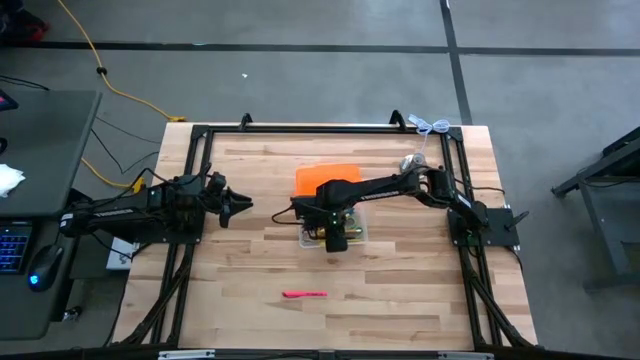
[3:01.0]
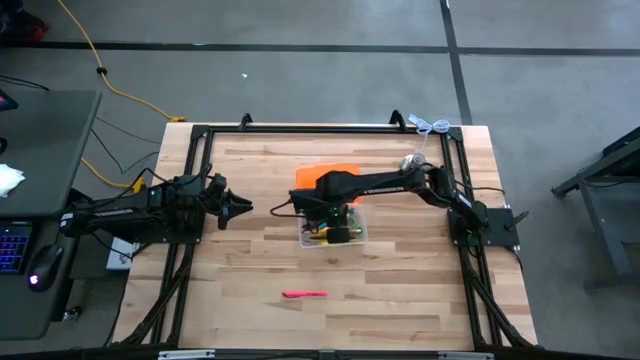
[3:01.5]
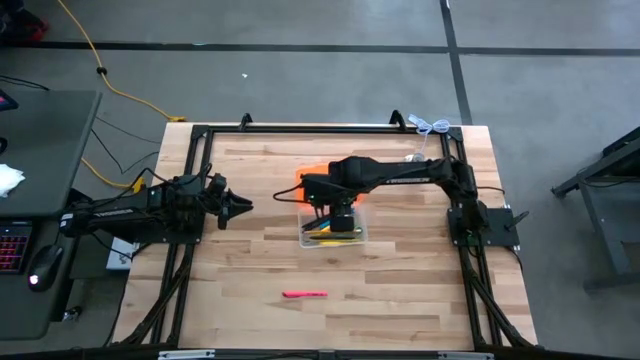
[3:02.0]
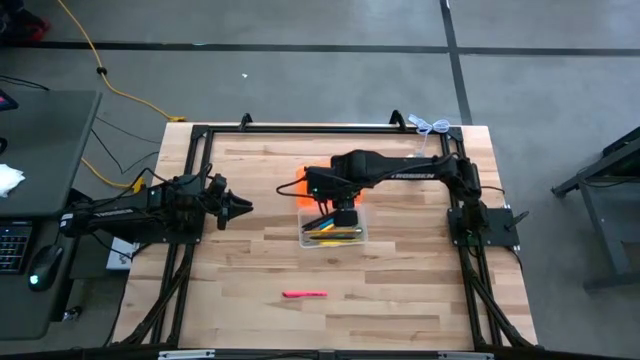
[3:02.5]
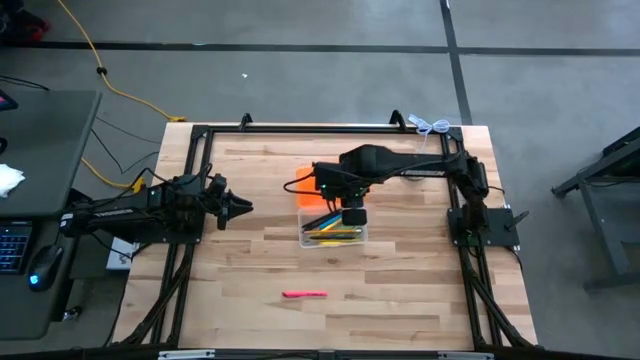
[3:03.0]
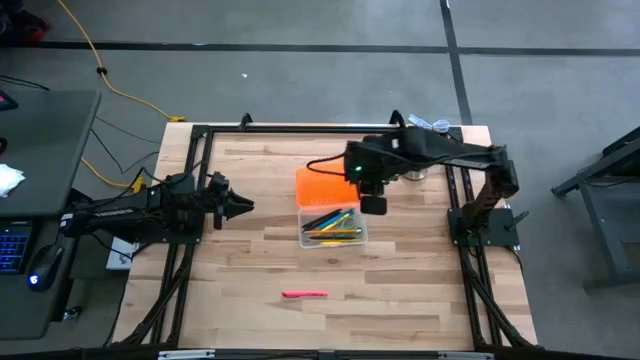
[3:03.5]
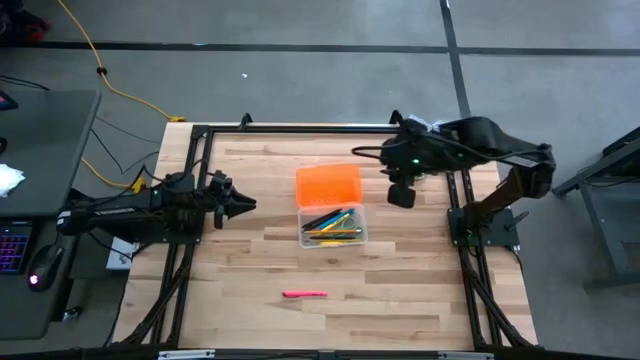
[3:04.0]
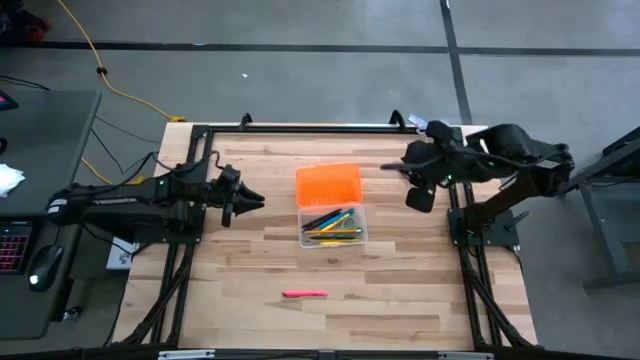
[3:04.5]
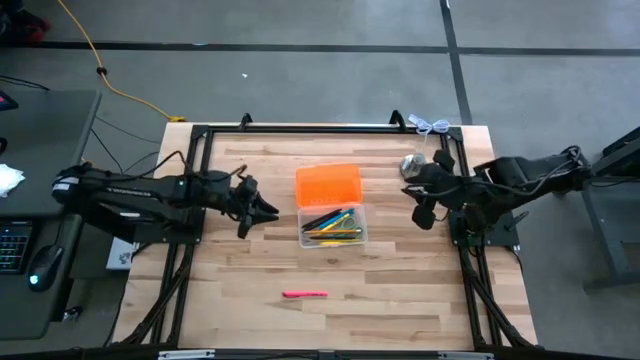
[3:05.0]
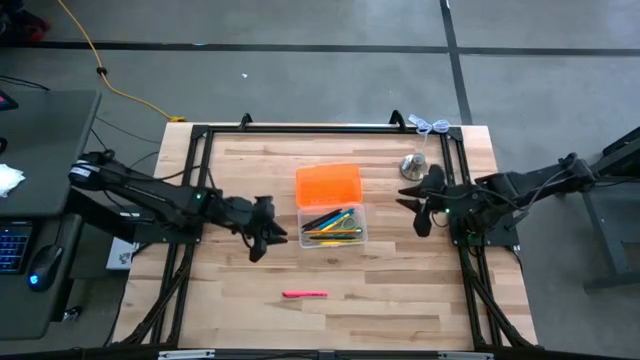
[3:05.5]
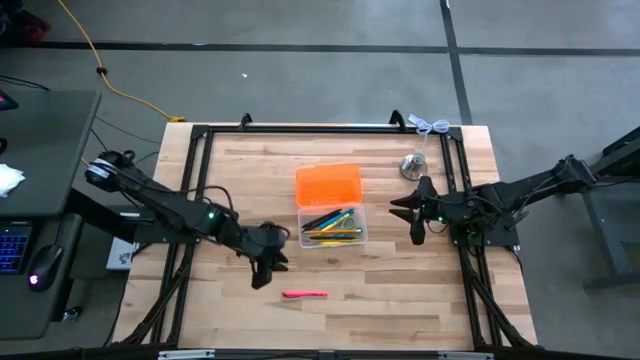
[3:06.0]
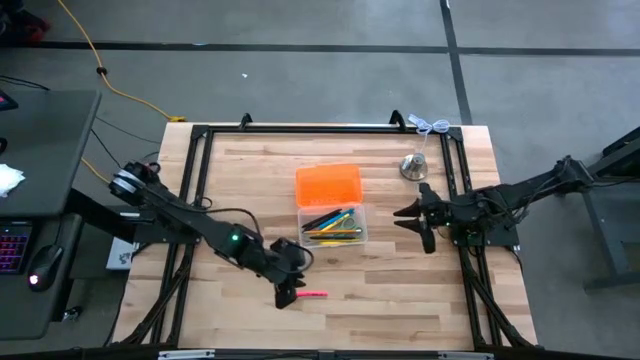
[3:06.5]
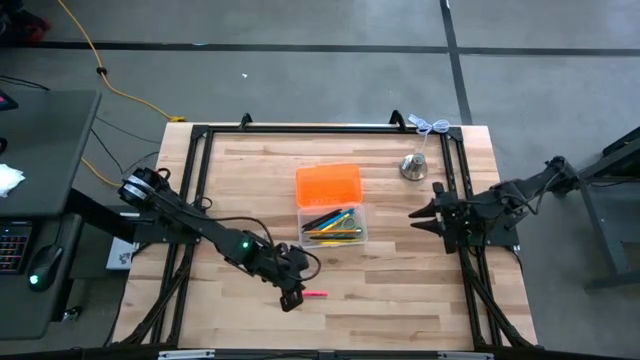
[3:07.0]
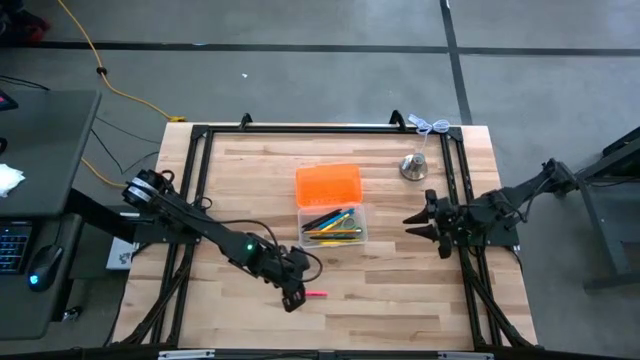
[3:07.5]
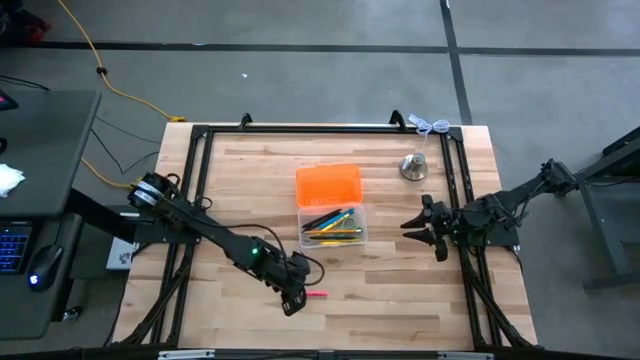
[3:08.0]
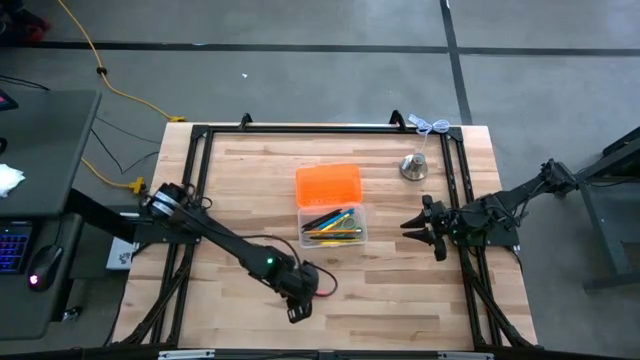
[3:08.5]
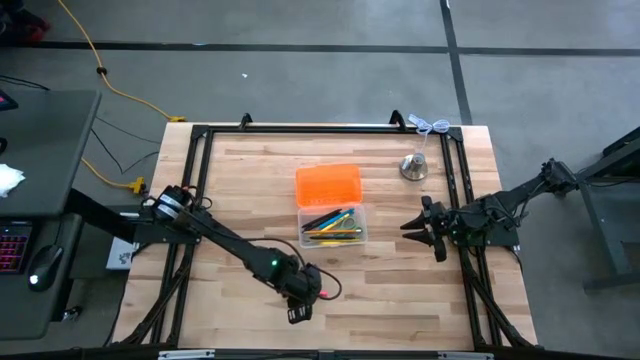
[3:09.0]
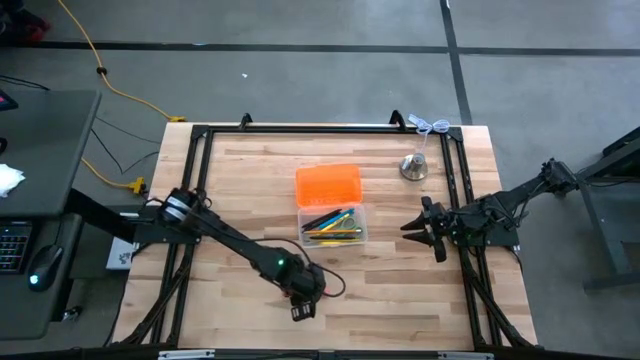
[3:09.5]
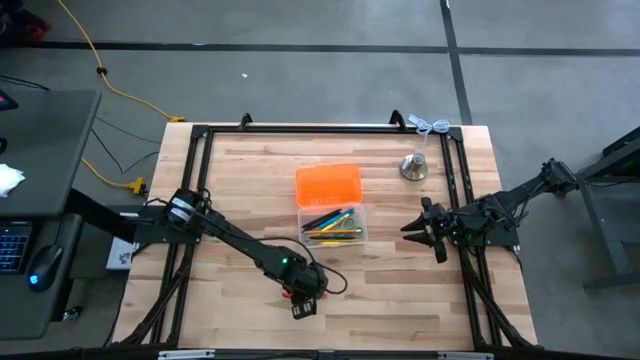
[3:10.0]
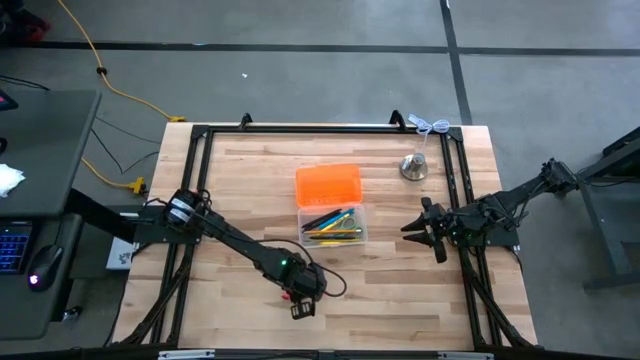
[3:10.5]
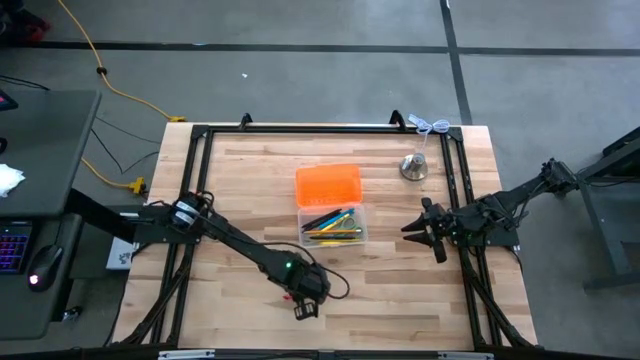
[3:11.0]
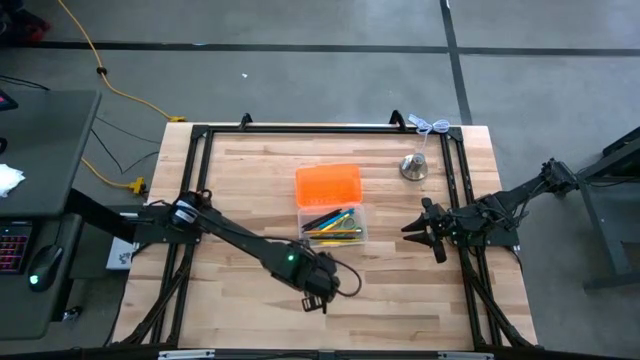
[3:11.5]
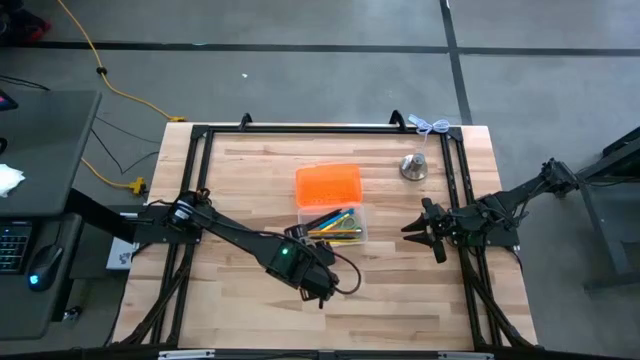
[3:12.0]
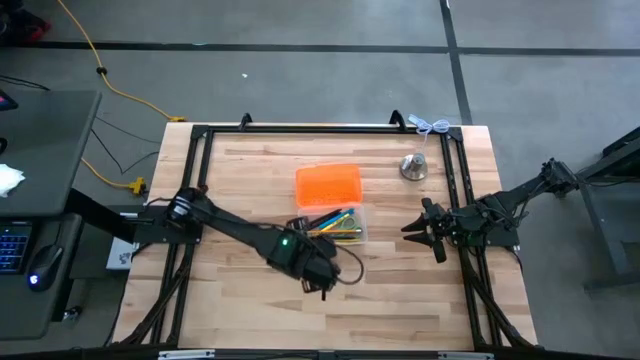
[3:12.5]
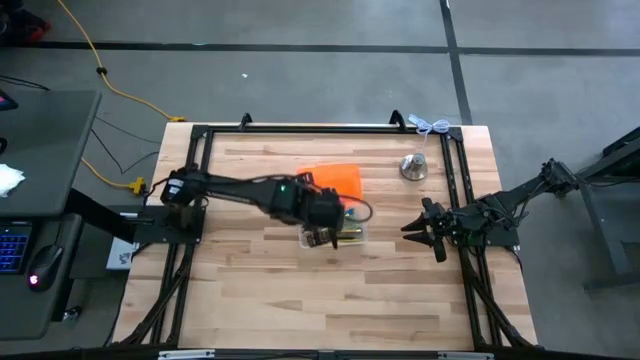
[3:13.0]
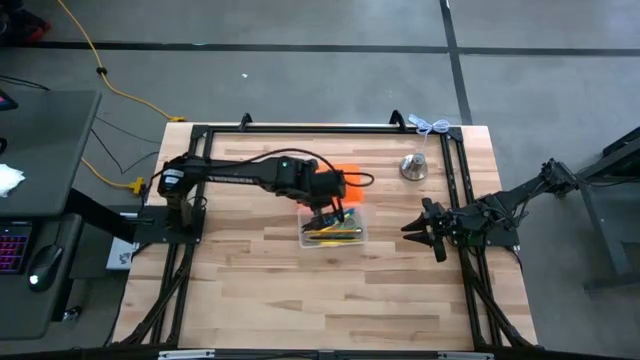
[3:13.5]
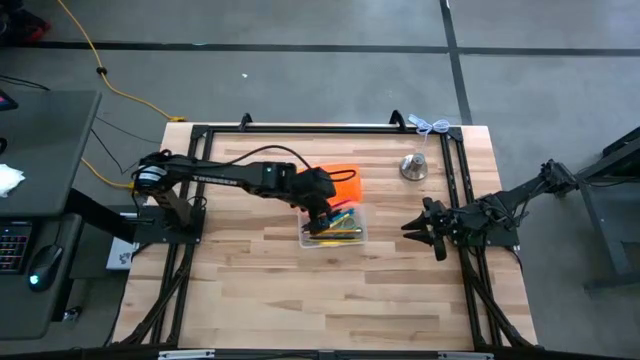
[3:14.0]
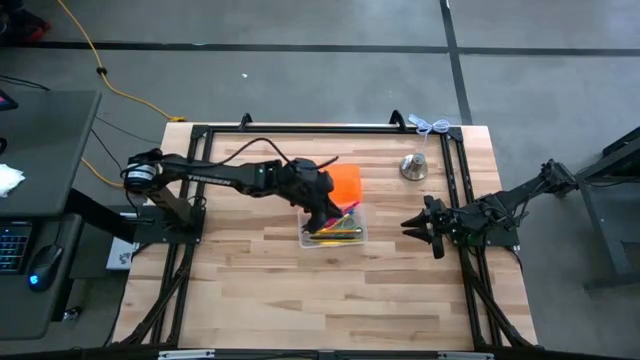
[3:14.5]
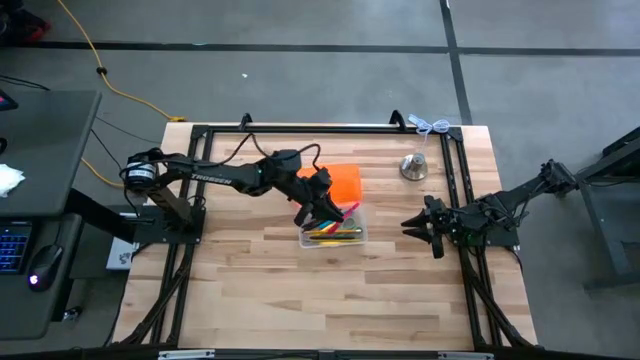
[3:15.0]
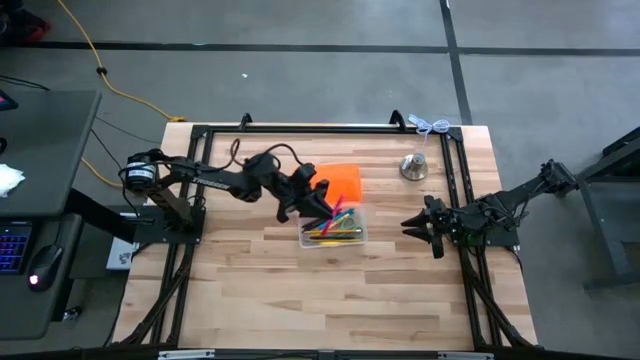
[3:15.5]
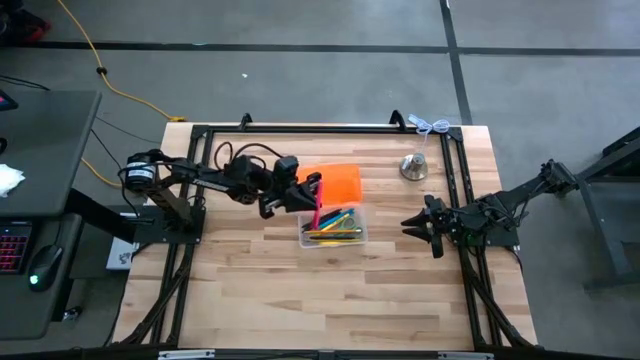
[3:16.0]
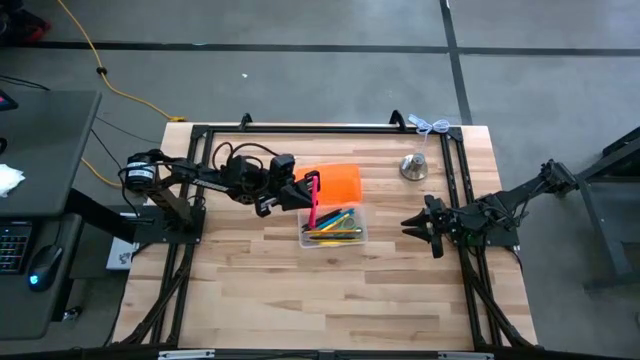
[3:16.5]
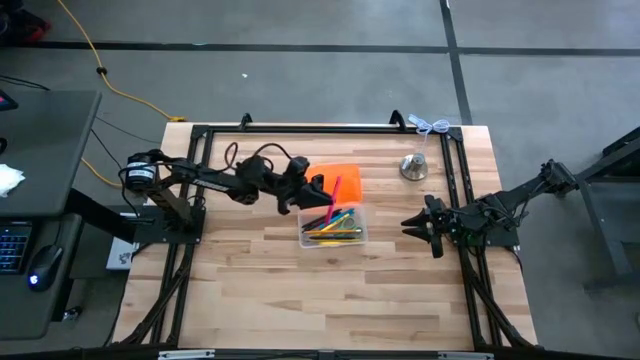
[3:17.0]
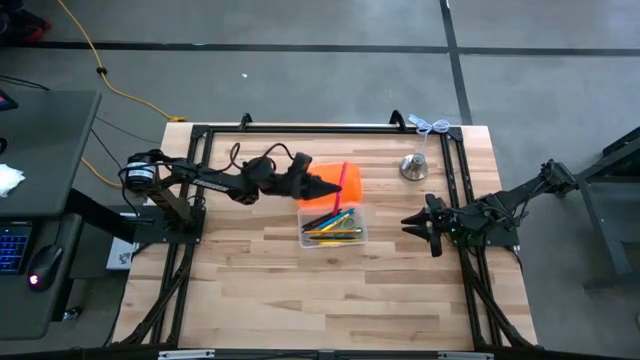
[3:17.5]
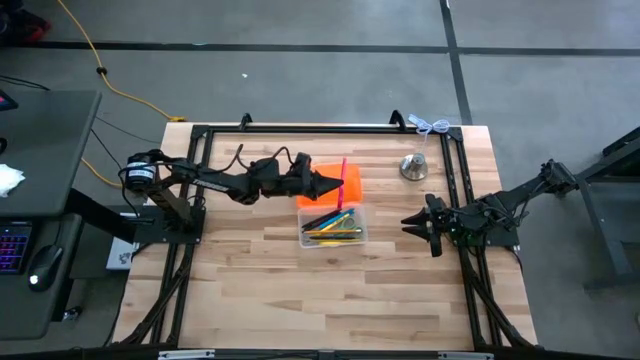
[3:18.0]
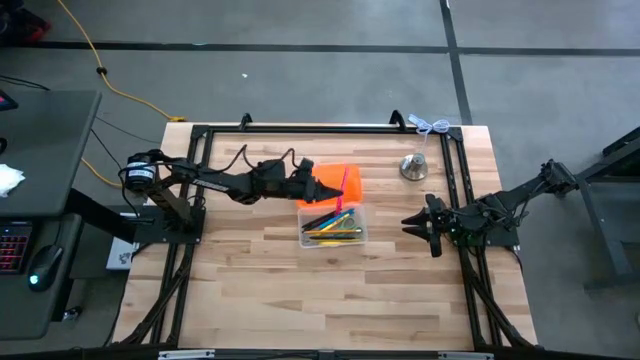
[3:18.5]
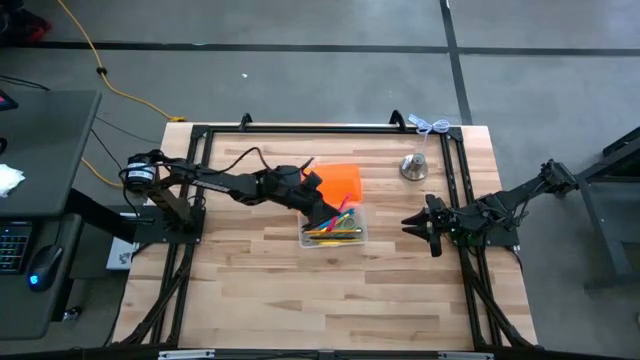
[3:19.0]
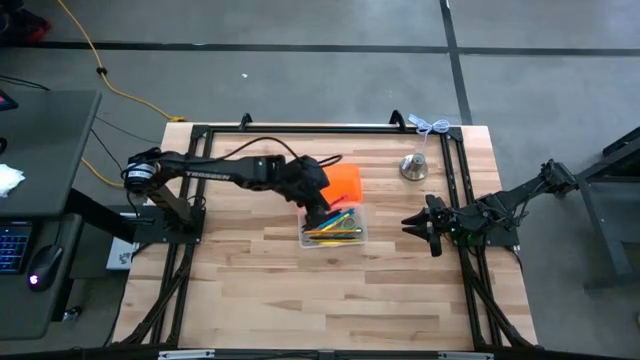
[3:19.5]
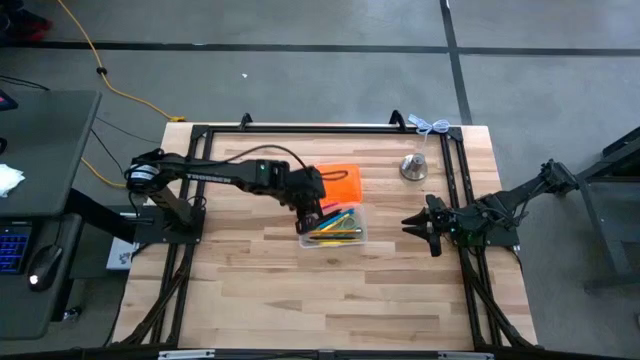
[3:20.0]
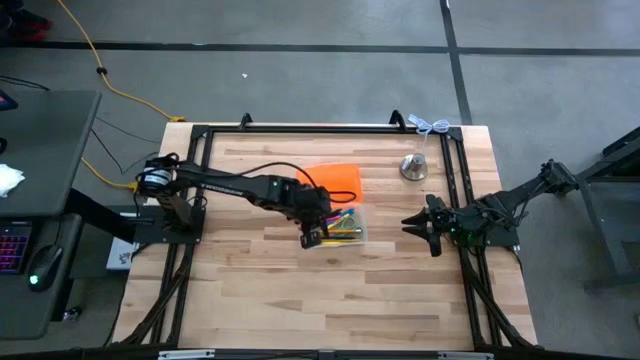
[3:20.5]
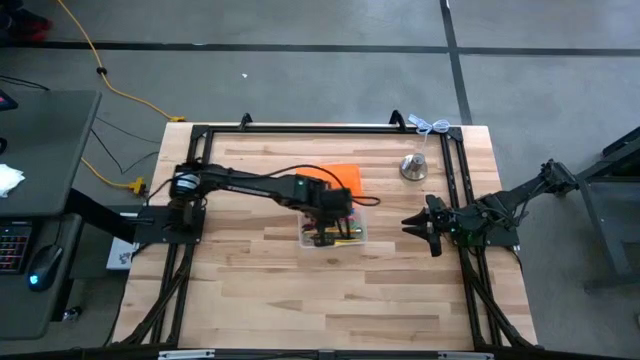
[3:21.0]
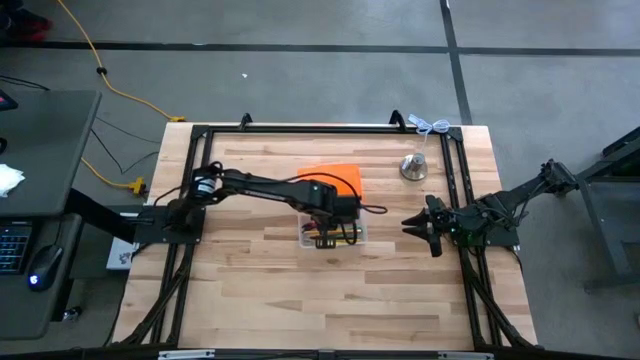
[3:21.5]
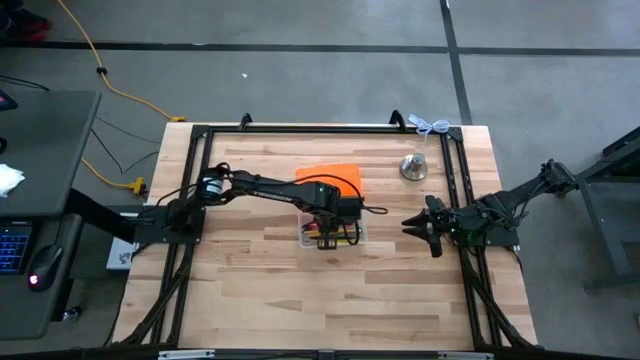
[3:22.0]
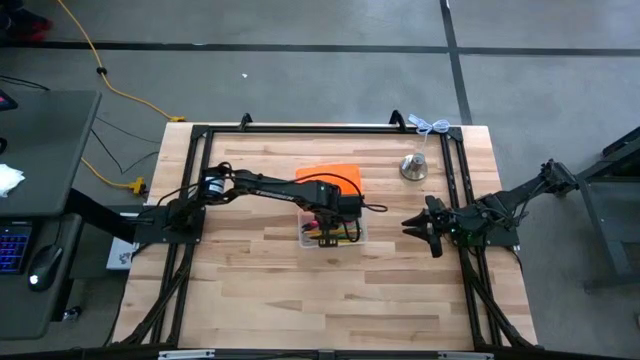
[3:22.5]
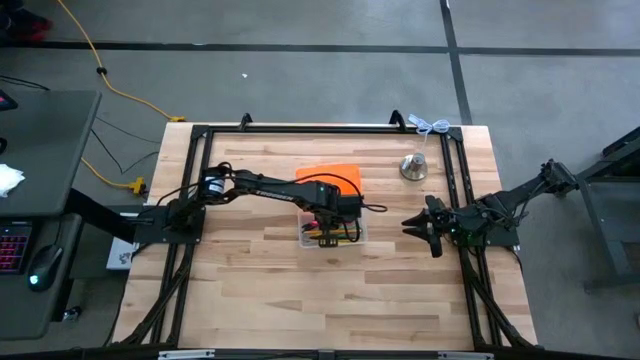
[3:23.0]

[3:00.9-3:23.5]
Task: Pick & place school supplies into a supply box
Put the pink pen into the orange supply box
